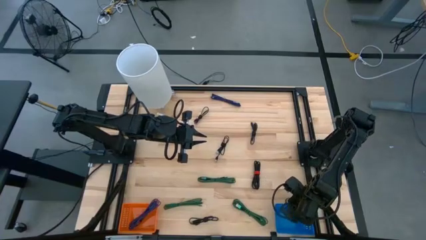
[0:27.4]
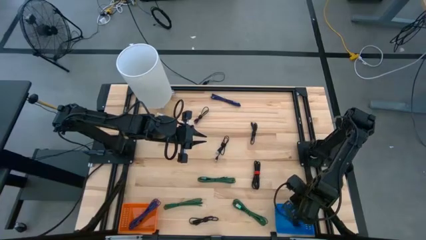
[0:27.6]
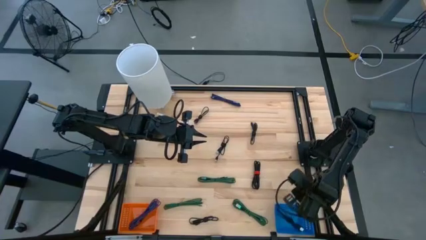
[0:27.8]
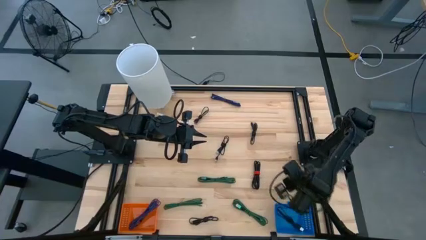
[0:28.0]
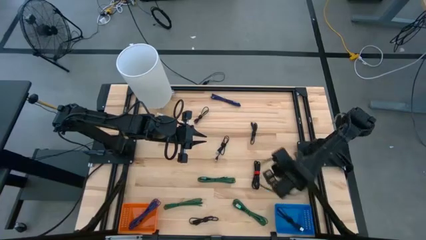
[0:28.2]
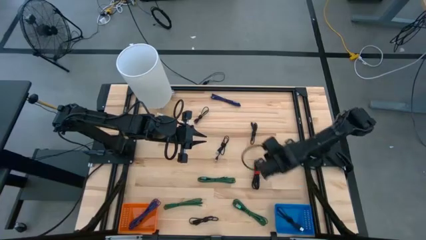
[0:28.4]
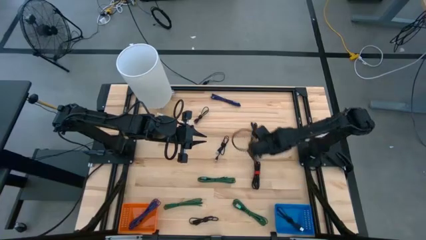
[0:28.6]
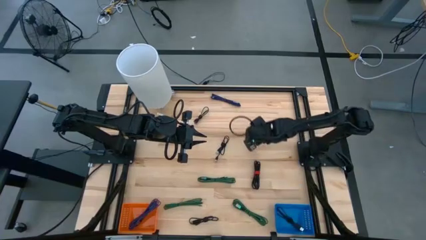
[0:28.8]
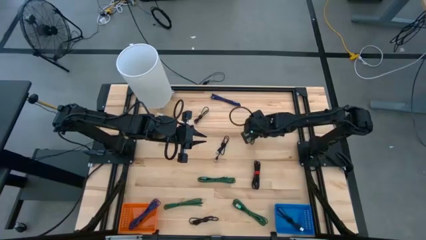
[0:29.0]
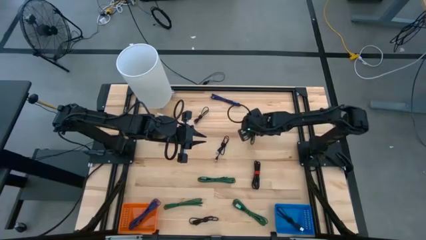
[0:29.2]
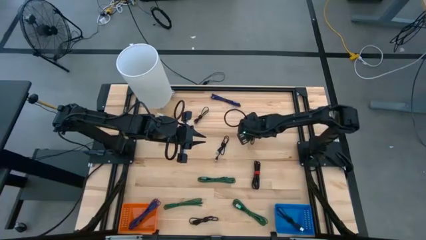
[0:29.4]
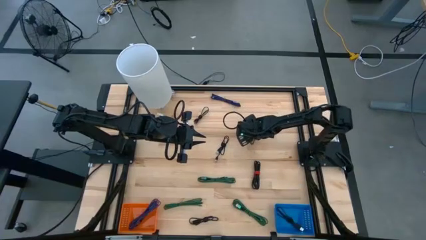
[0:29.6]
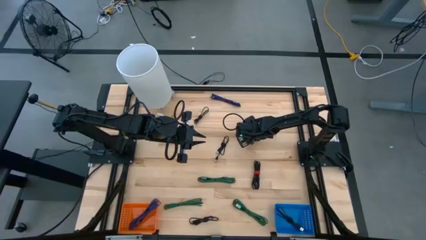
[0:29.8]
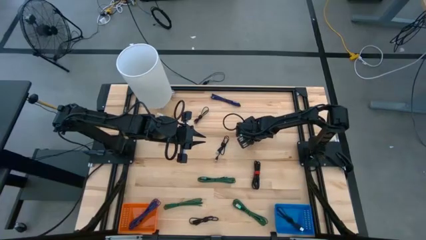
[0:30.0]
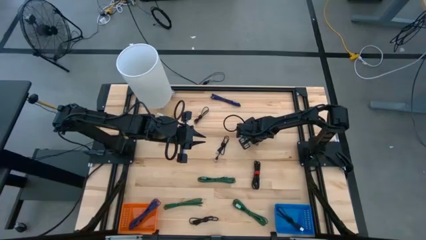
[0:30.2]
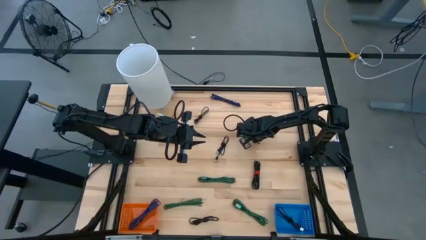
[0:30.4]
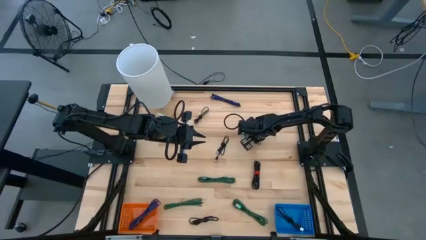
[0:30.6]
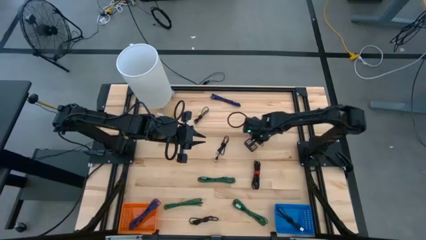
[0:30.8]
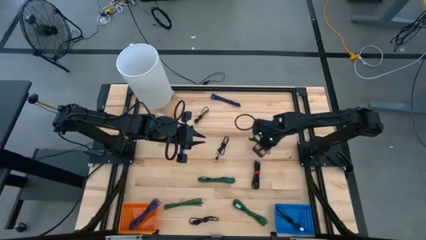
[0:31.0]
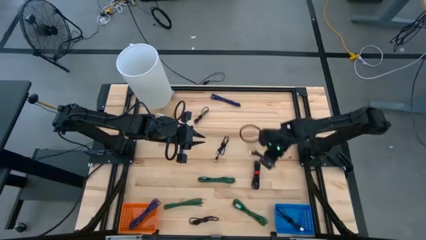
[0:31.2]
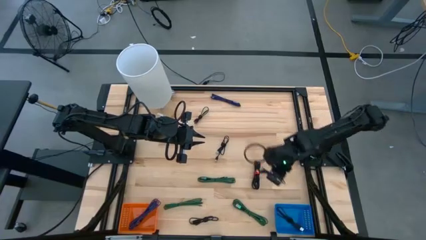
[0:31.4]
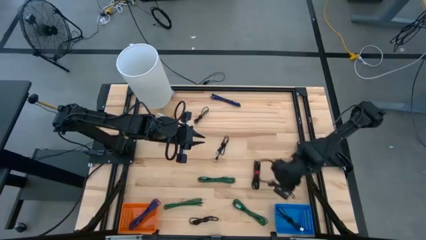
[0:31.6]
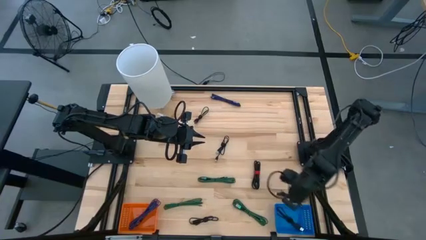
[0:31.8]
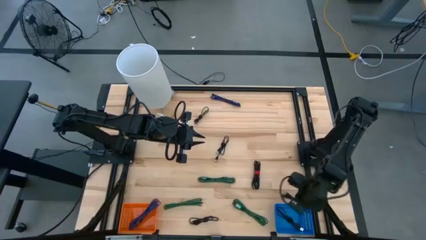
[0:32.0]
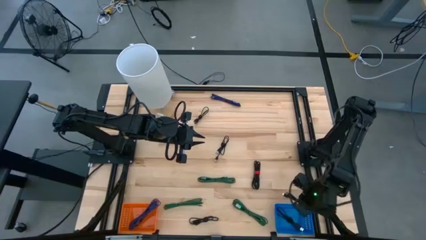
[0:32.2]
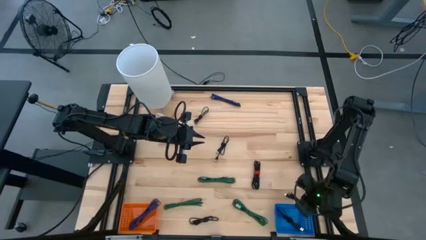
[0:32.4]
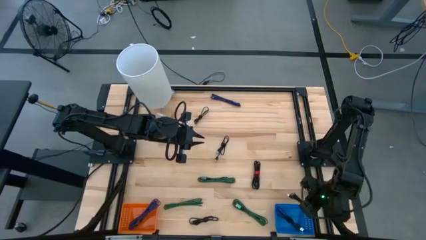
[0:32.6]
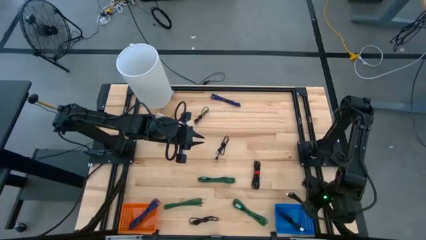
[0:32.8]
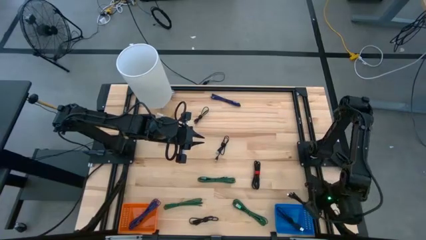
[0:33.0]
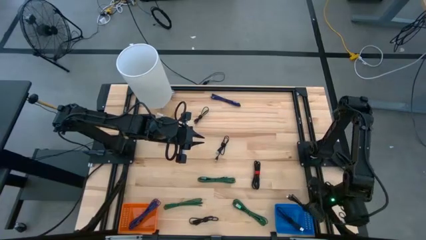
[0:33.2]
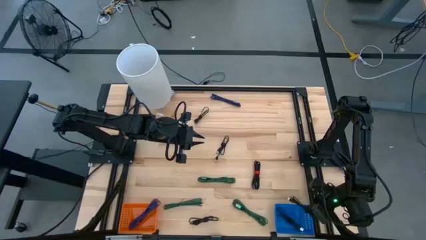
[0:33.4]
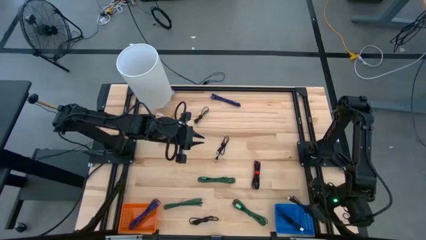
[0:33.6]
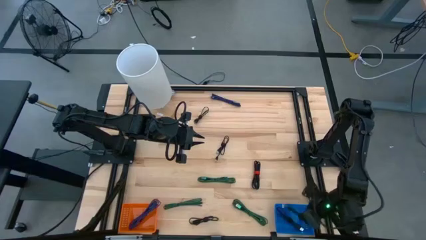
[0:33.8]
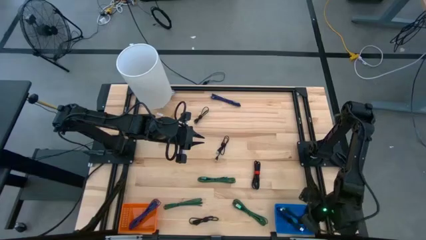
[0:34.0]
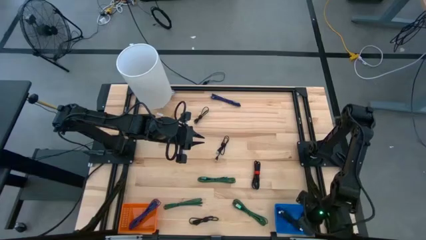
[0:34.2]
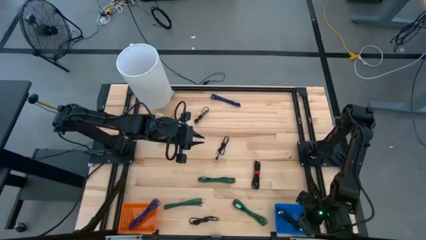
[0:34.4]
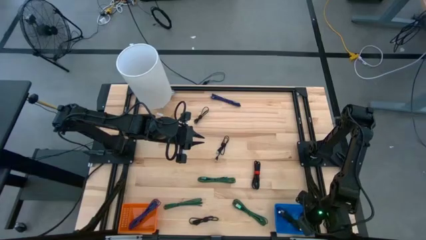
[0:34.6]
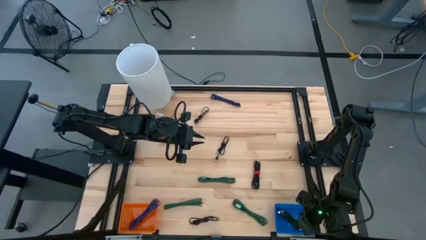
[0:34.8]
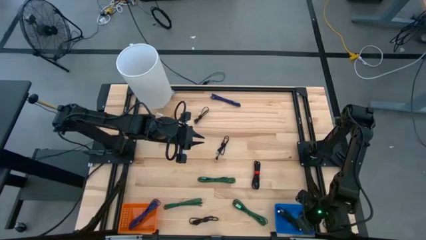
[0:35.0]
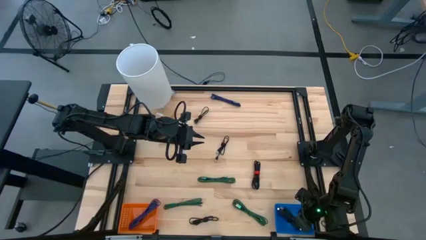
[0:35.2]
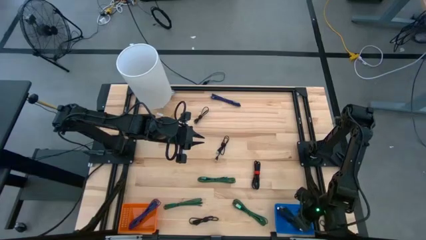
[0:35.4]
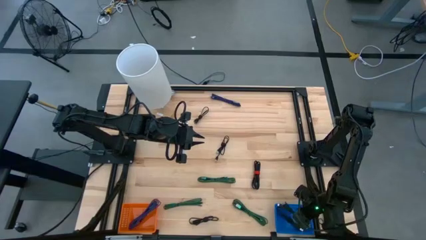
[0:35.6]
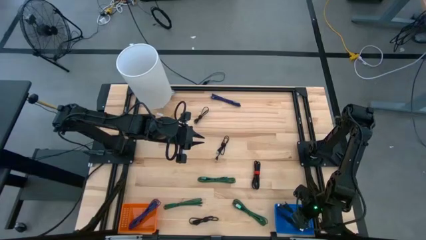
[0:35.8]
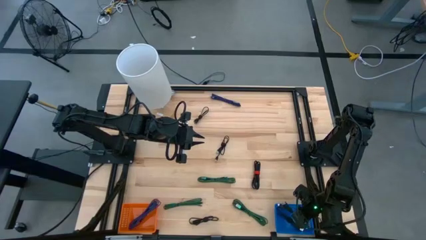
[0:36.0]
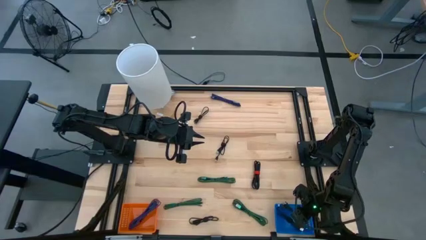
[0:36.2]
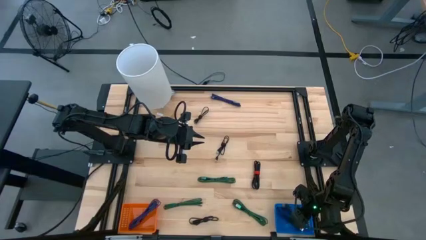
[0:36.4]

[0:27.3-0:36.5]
Task: Pick & Place USB Port
Put the black charger cable into the blue bin

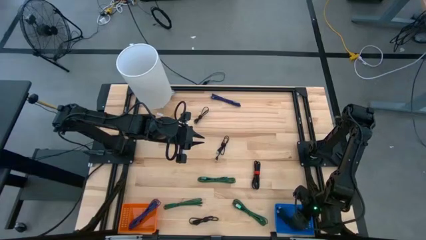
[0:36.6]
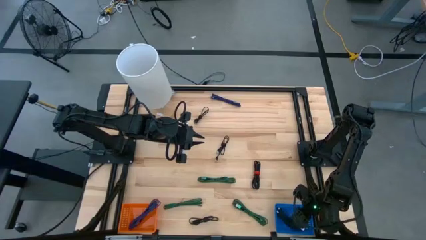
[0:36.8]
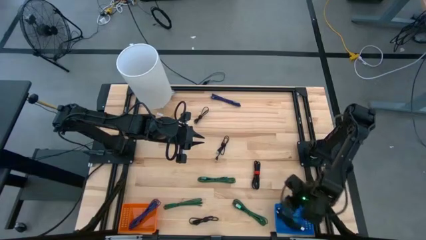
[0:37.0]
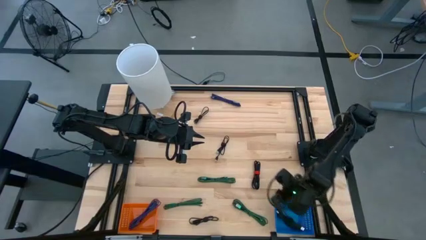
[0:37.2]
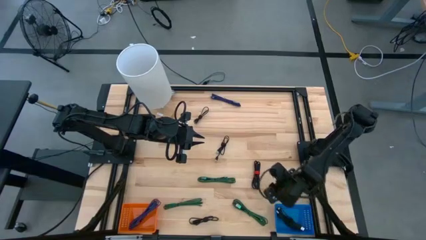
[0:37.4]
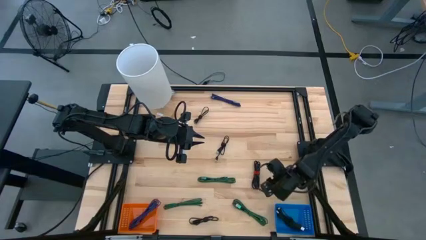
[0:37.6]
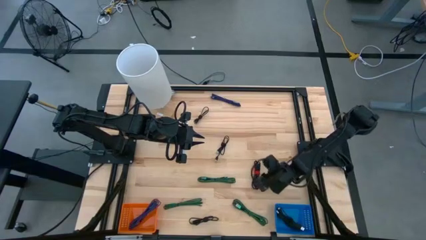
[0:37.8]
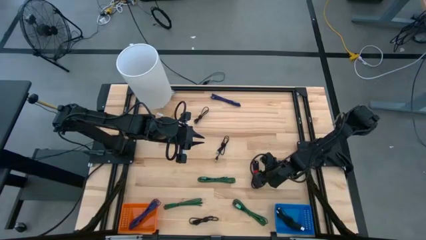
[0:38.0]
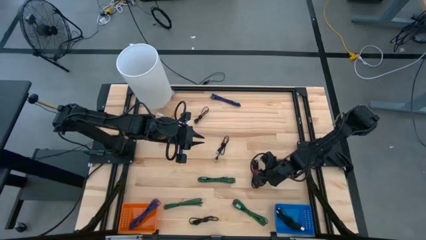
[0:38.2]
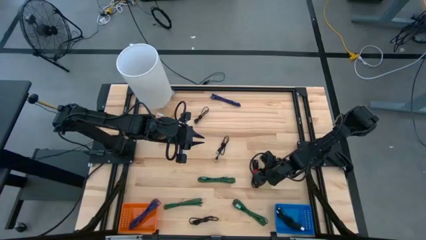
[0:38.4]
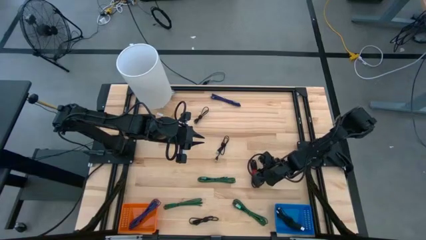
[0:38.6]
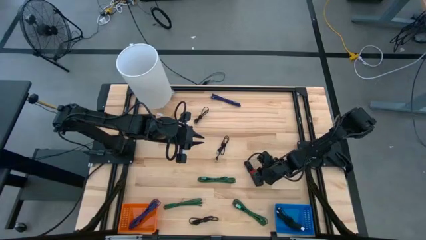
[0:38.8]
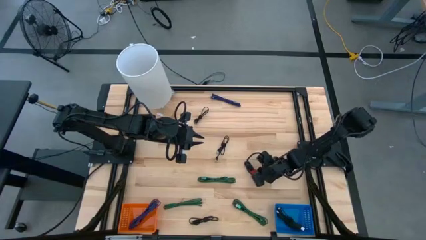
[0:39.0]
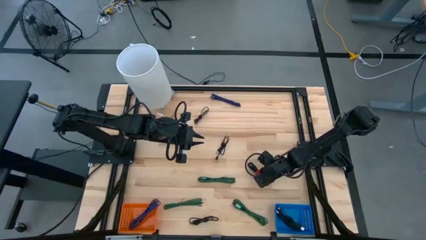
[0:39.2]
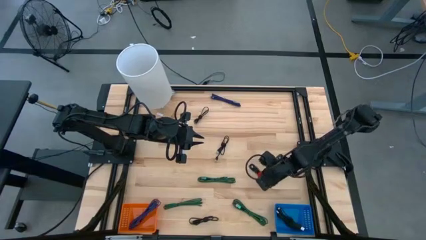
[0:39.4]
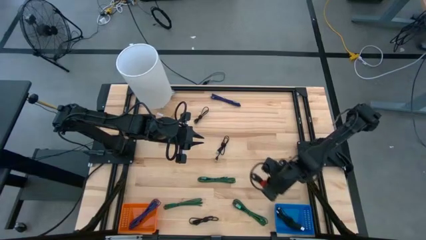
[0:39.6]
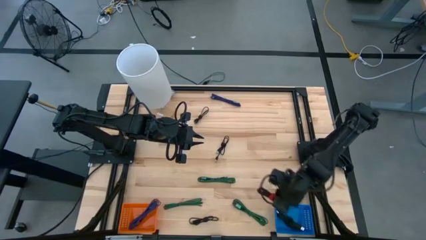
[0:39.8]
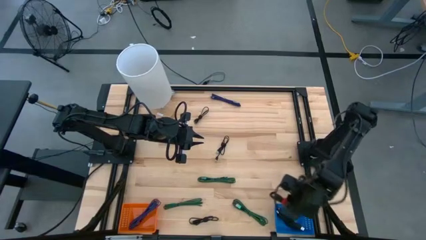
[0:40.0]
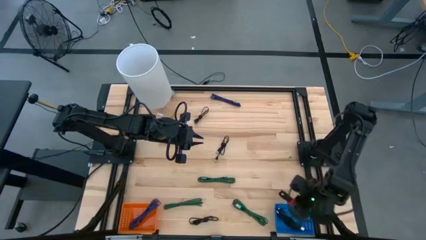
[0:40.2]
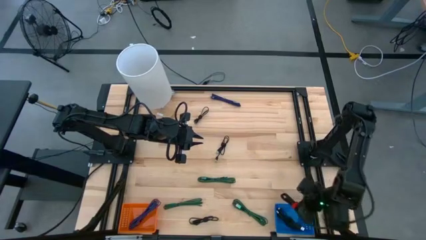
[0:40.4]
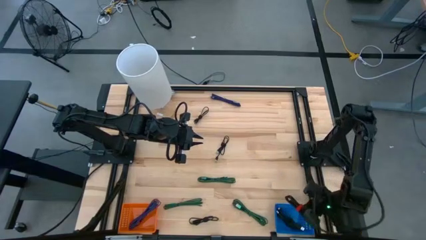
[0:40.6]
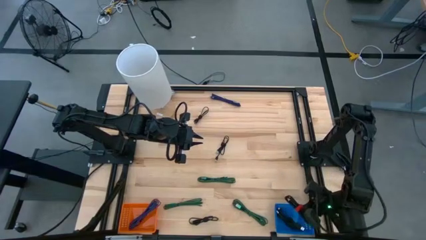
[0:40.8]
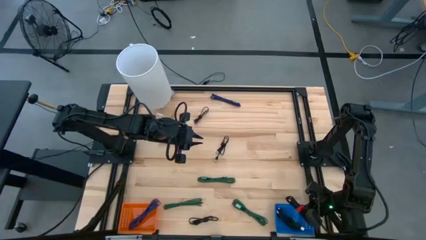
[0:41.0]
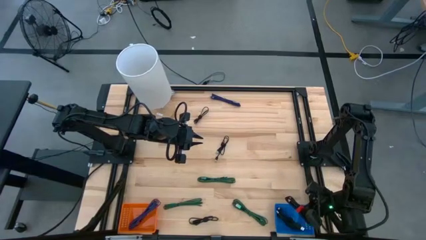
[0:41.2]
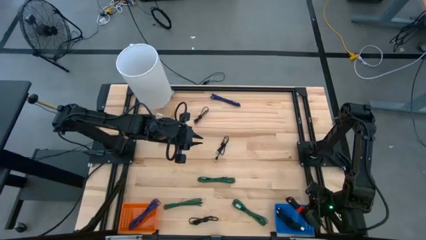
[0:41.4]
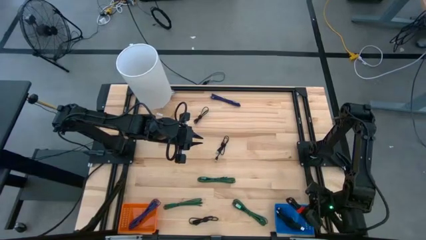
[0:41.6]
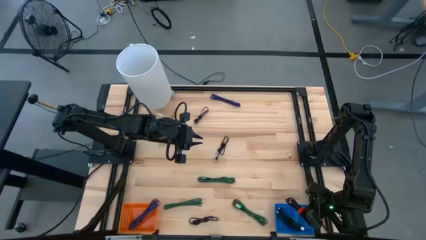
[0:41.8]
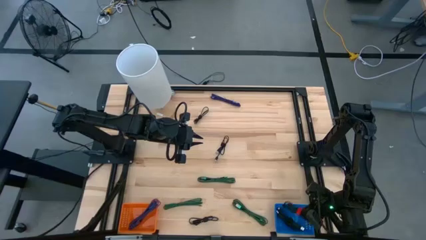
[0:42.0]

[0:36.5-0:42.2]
Put the black charger cable into the blue bin

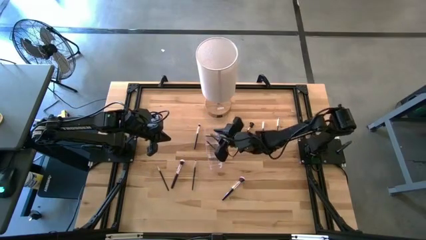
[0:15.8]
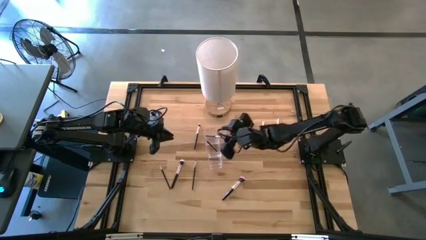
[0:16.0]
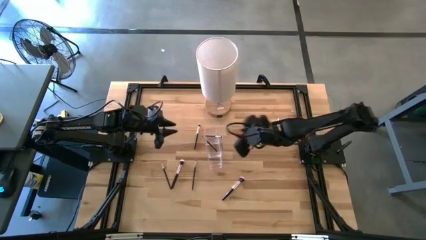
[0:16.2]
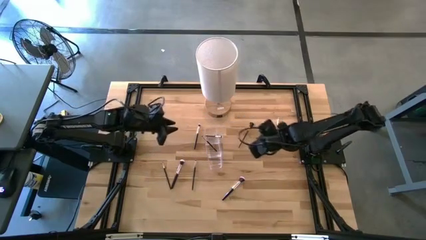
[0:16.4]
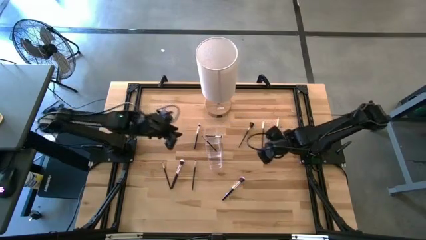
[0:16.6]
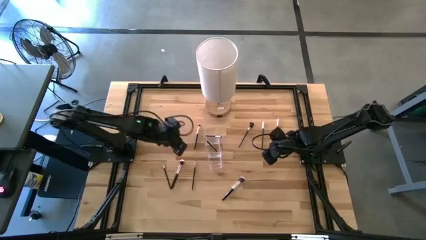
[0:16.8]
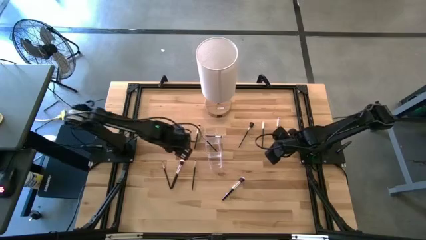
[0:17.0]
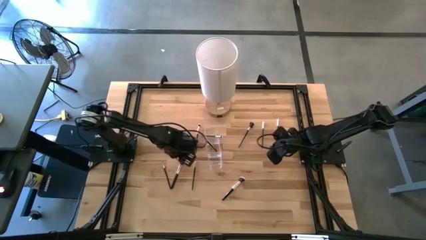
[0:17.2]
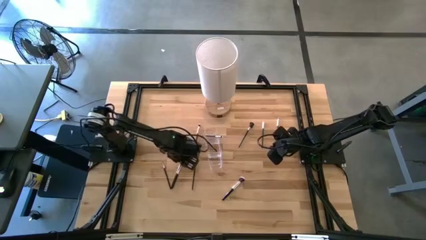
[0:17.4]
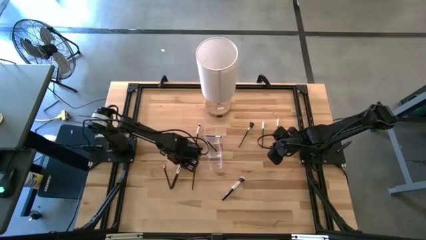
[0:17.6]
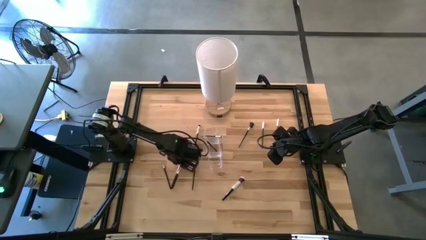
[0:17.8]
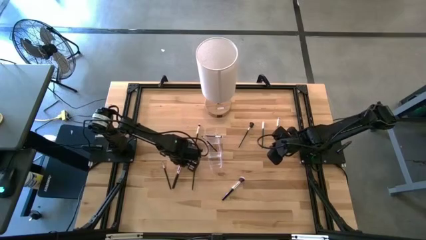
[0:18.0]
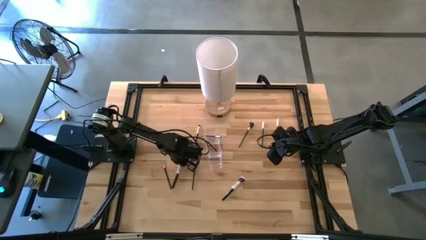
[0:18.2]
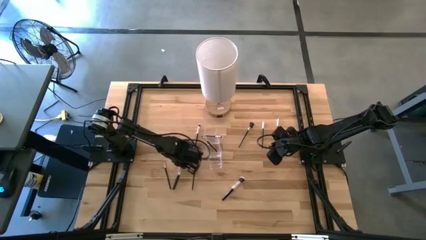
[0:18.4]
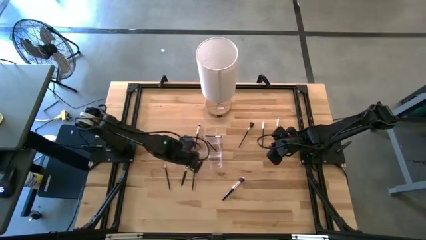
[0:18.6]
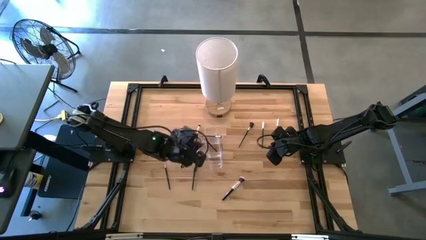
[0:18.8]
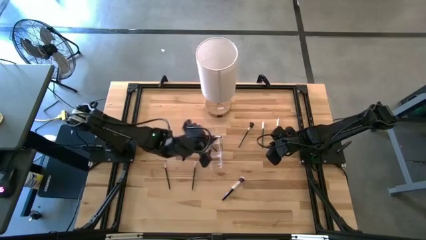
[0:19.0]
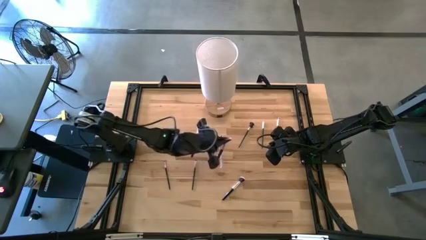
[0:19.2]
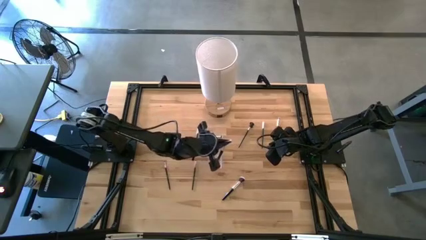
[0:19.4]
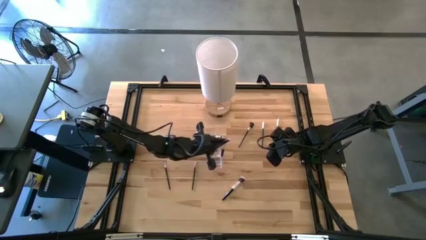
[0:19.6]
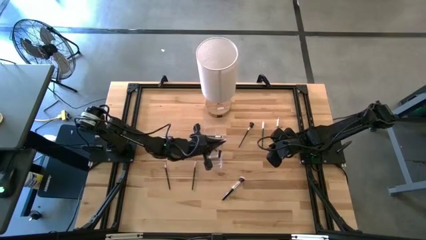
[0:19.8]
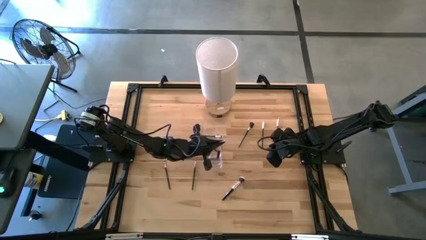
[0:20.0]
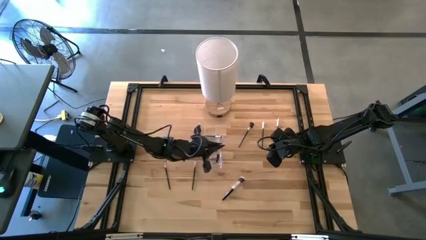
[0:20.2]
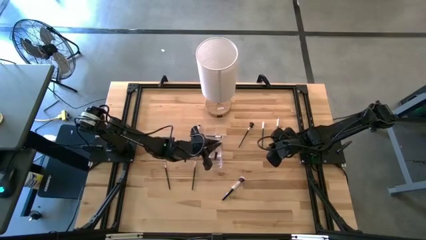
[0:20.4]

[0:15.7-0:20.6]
Task: Put items in baskets/containers
Put the black blush brush into the transparent organizer
